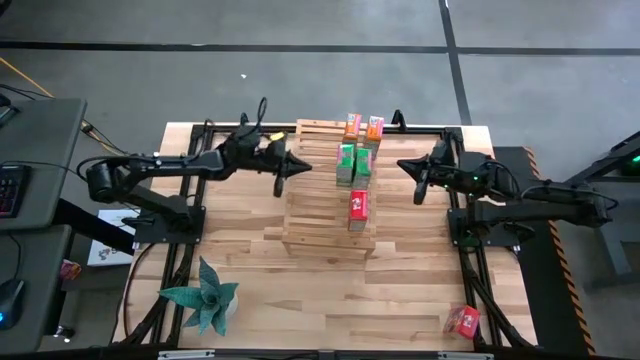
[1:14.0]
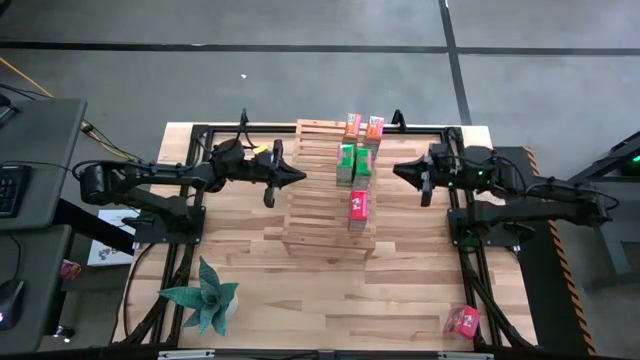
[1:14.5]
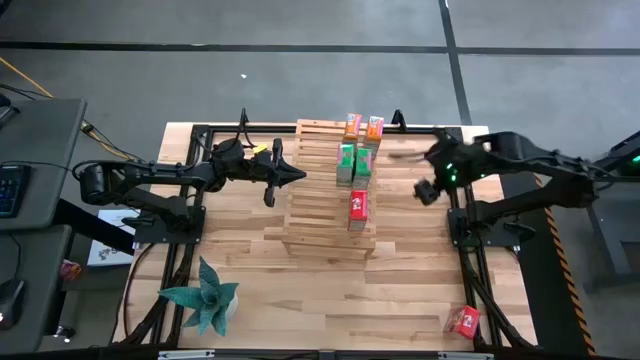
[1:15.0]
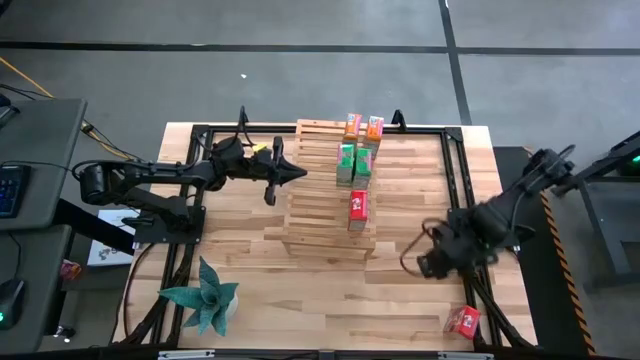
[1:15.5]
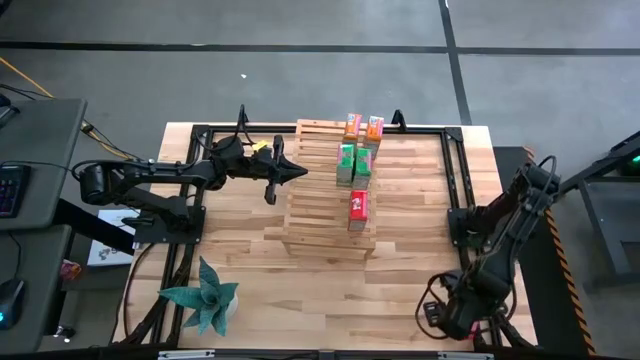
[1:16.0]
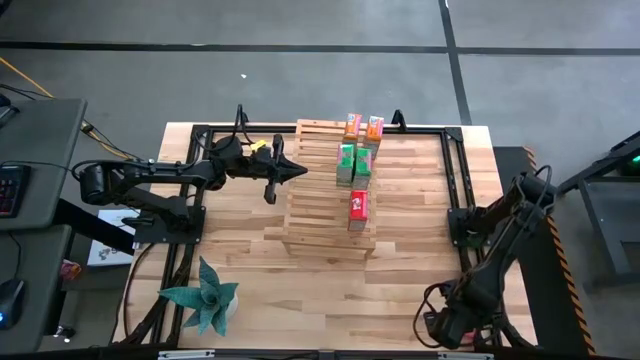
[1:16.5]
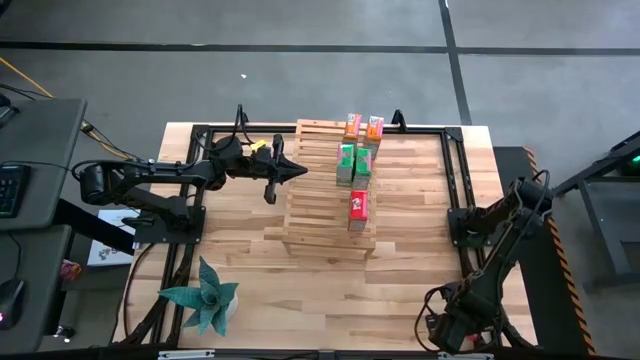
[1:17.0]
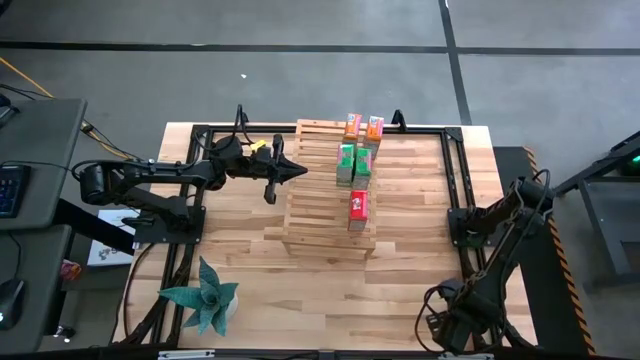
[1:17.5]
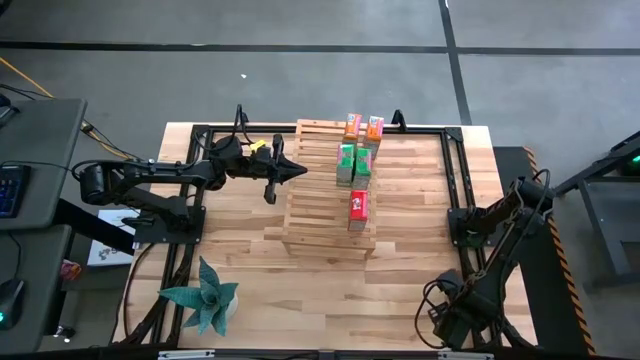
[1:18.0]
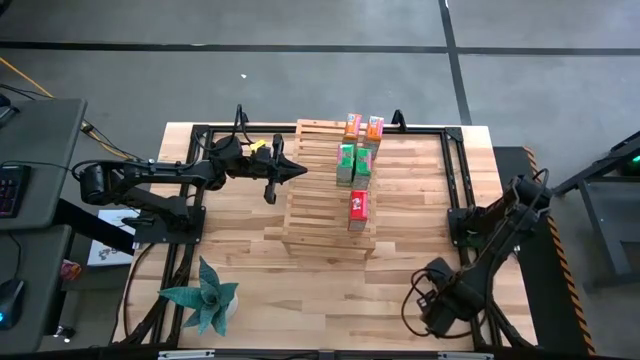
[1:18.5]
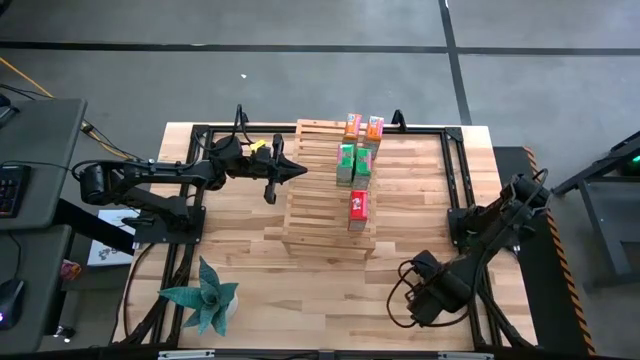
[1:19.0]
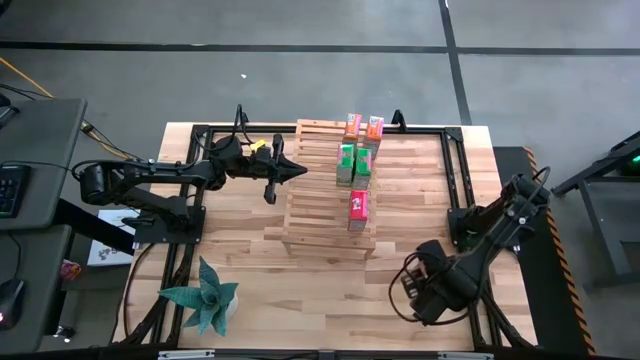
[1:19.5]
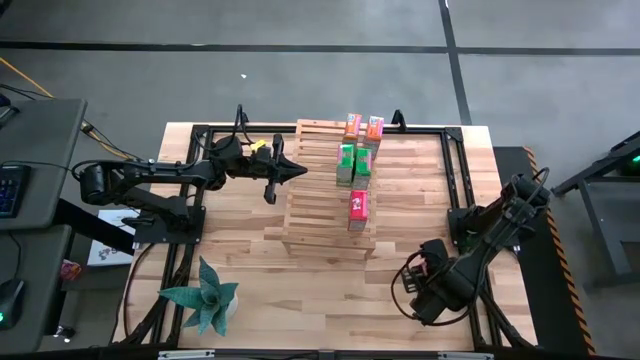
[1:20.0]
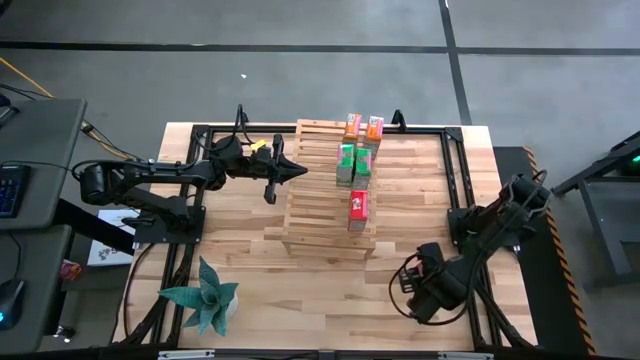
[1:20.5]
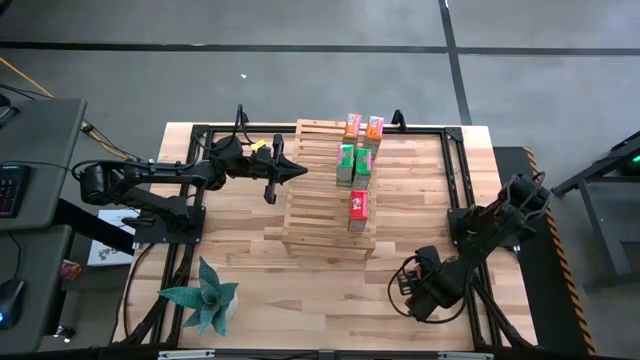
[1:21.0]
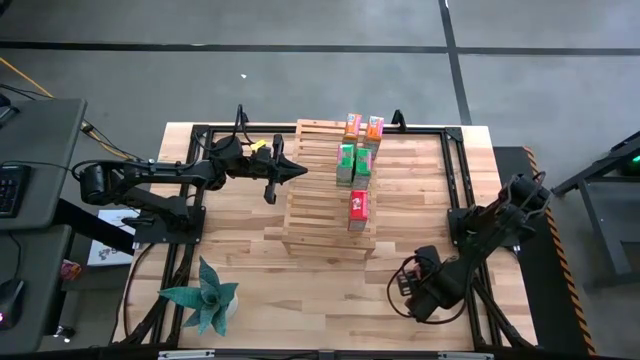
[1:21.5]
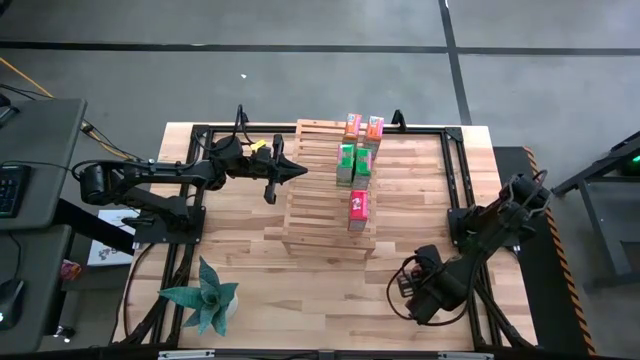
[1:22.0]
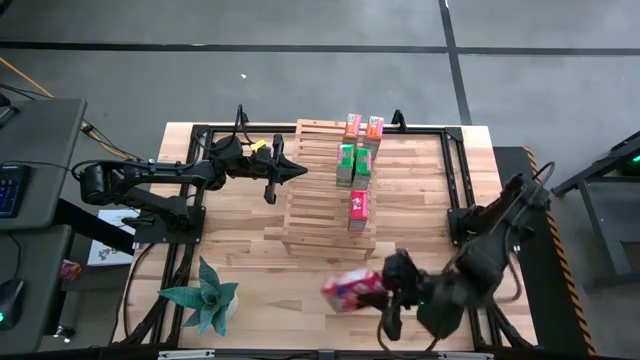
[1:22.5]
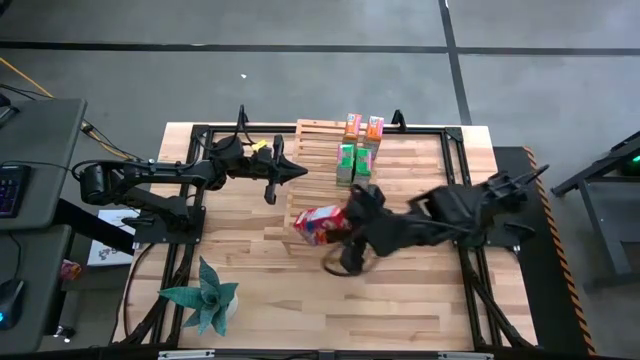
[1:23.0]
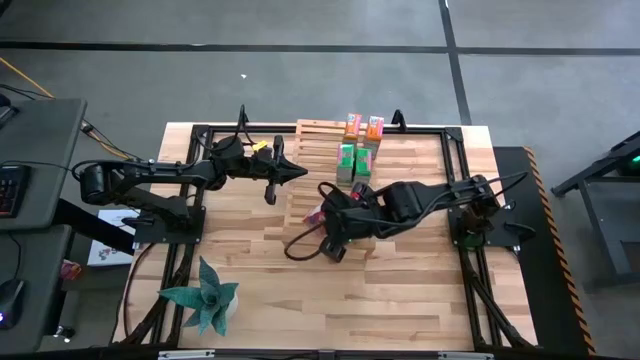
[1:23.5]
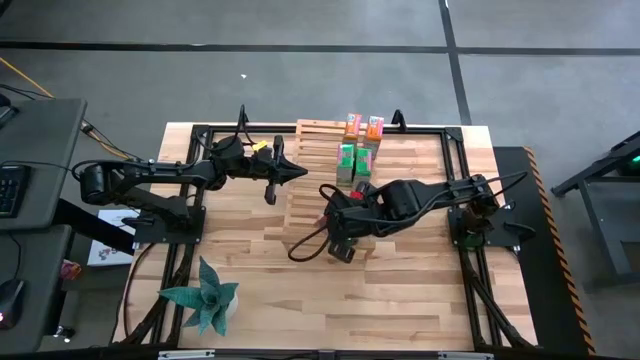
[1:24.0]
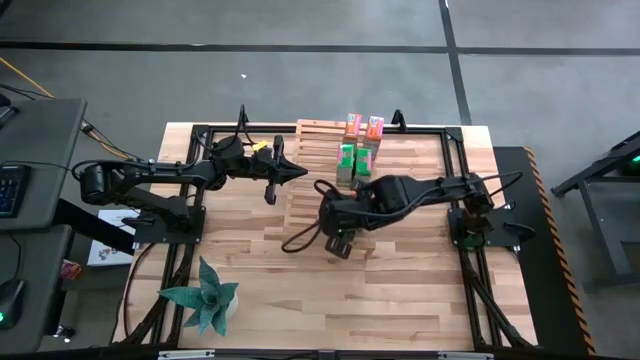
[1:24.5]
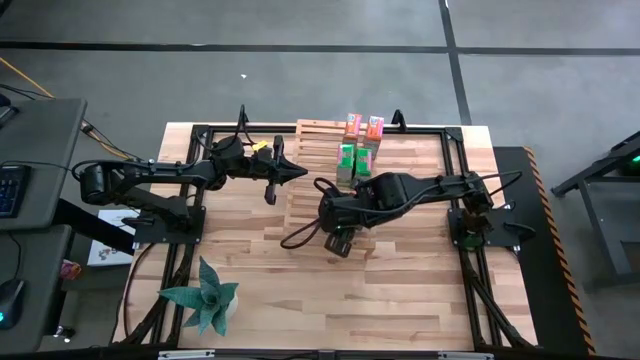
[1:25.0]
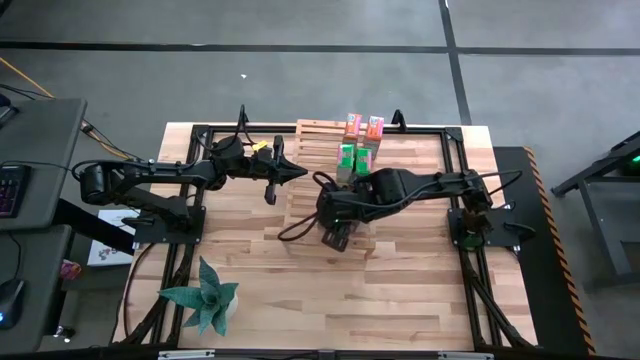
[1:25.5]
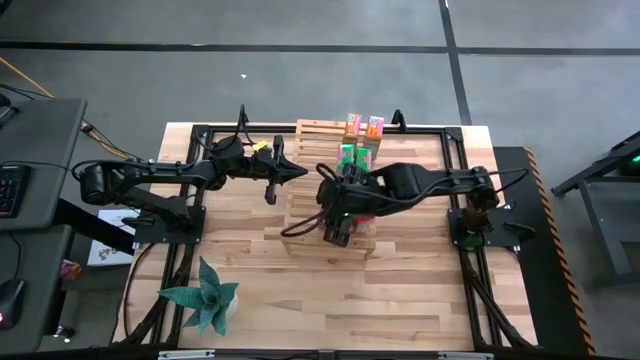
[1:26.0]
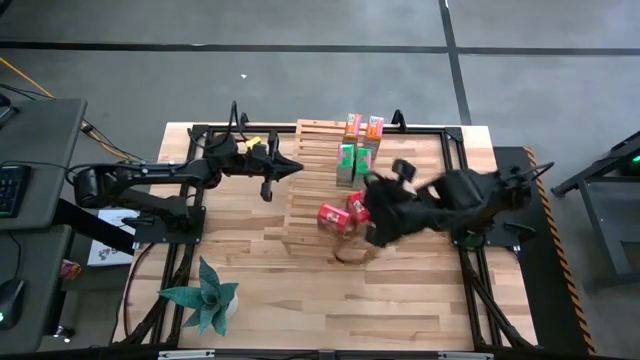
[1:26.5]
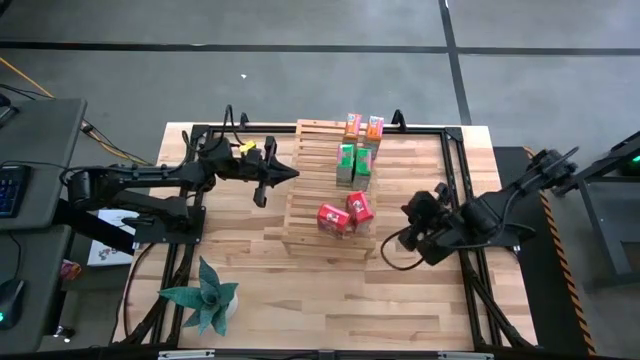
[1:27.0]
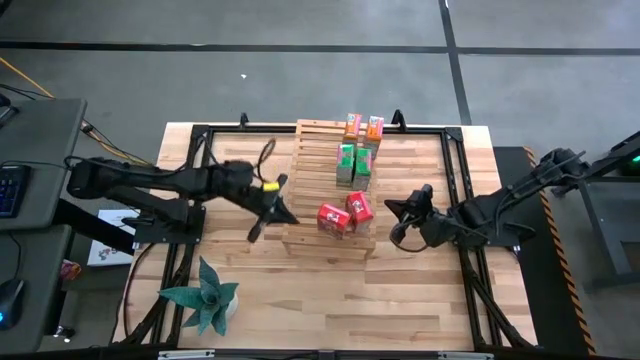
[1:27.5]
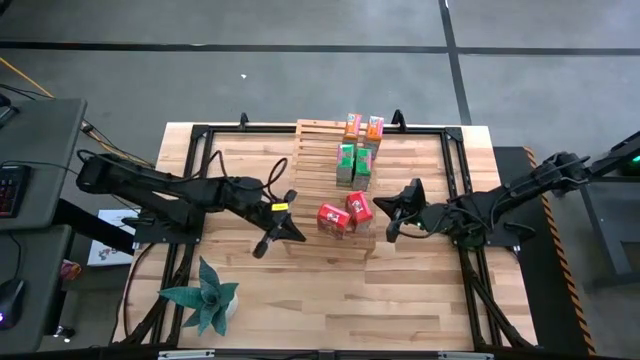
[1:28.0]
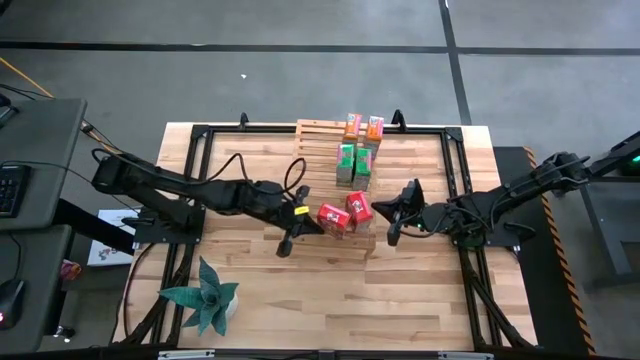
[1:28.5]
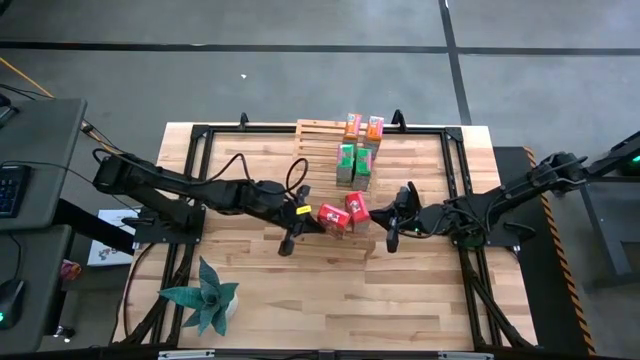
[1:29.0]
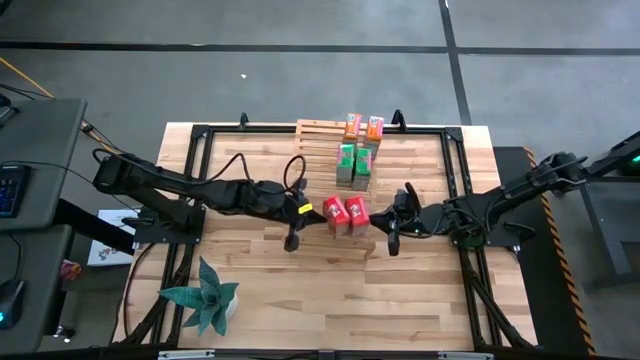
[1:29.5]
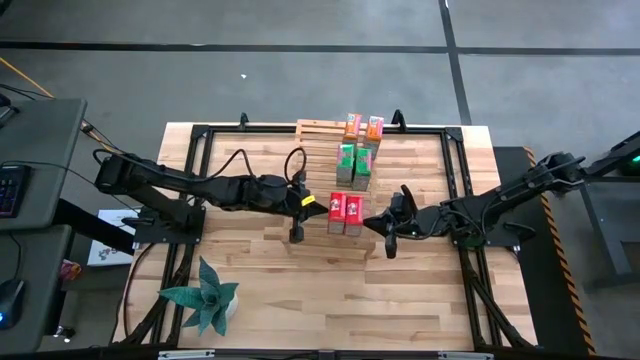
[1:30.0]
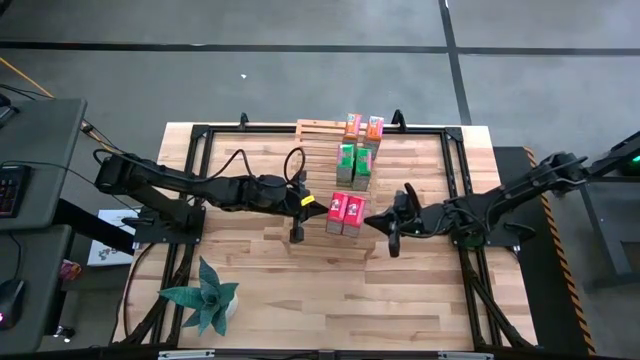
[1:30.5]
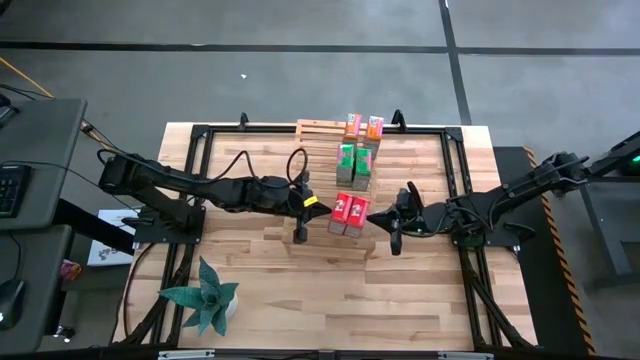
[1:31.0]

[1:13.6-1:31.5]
Task: Stack cereal on shelf
Put the red cereal box on the shelf aligned with the red cereal box

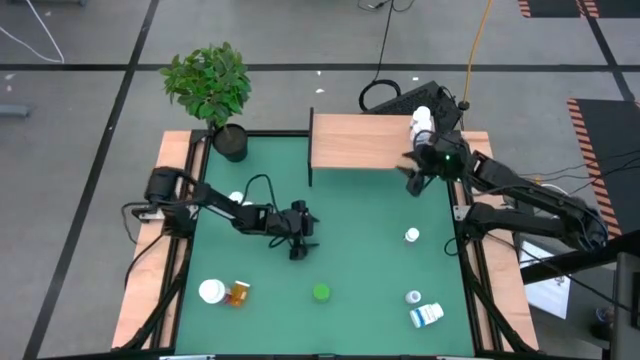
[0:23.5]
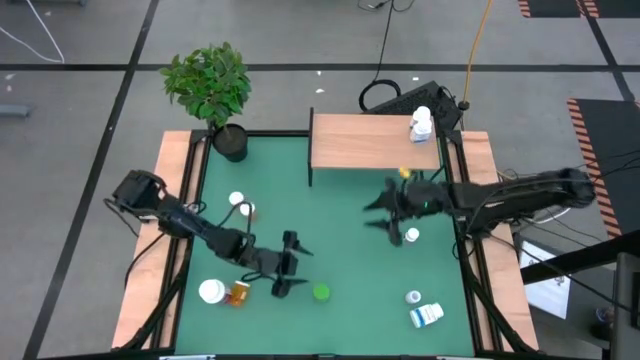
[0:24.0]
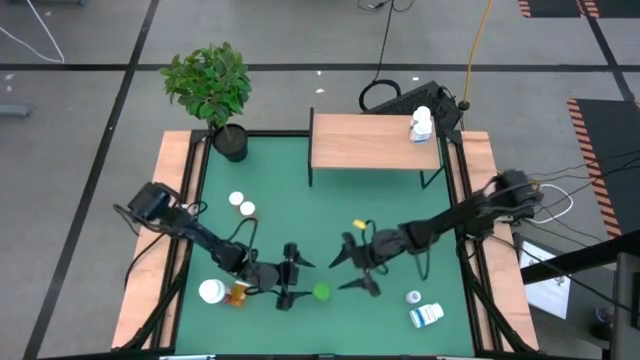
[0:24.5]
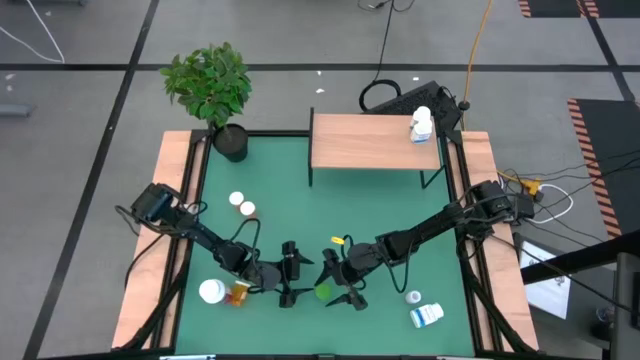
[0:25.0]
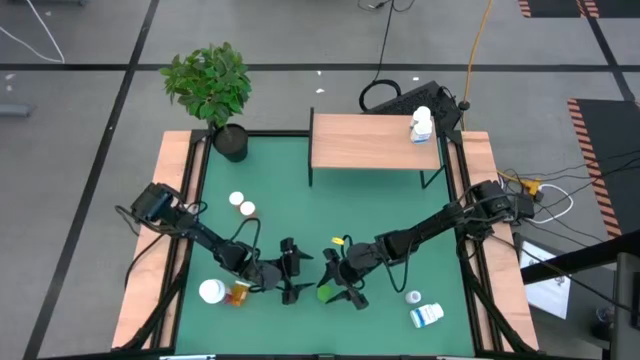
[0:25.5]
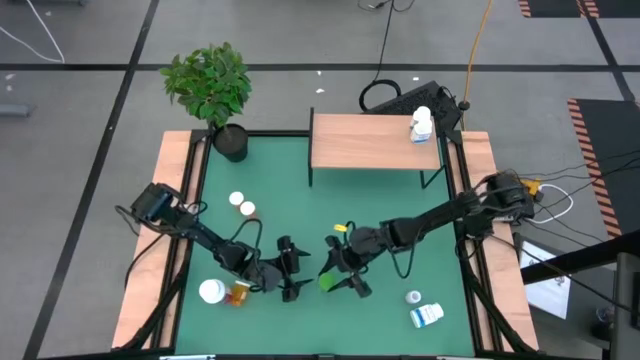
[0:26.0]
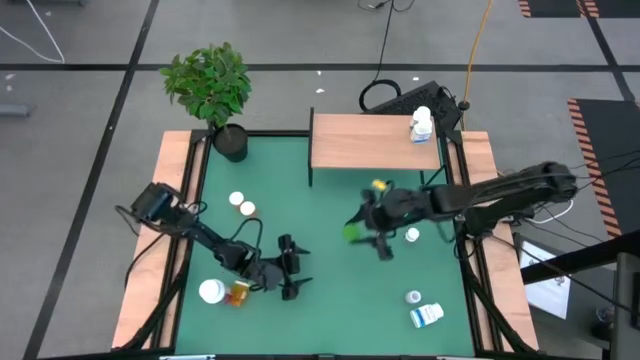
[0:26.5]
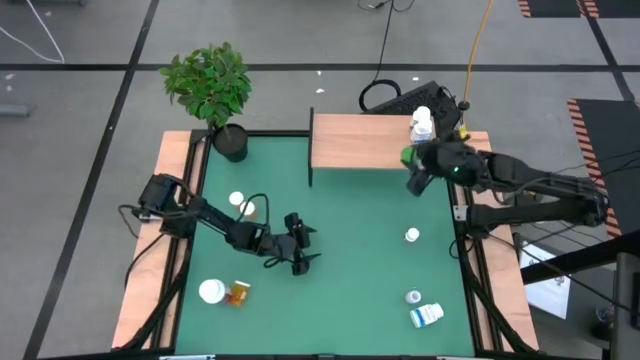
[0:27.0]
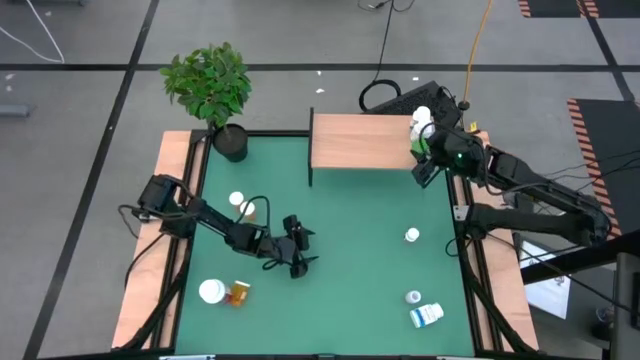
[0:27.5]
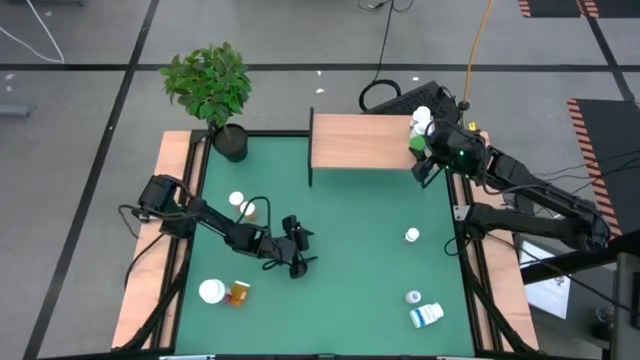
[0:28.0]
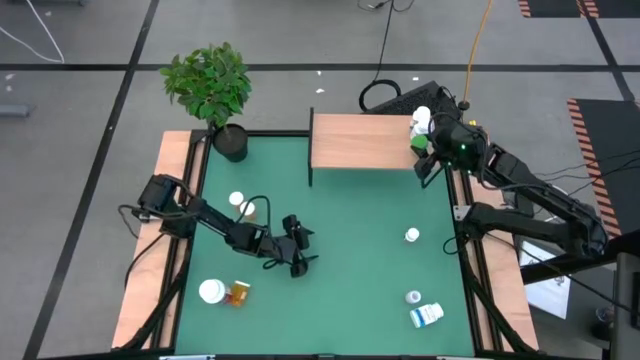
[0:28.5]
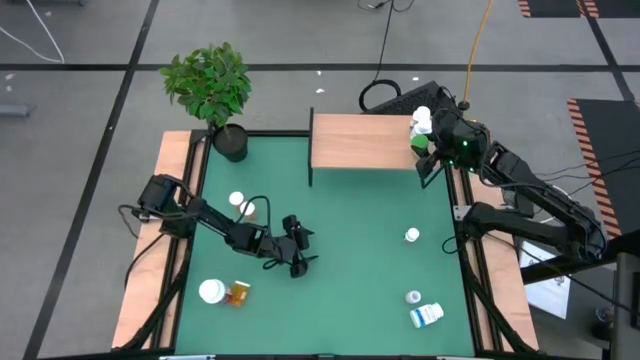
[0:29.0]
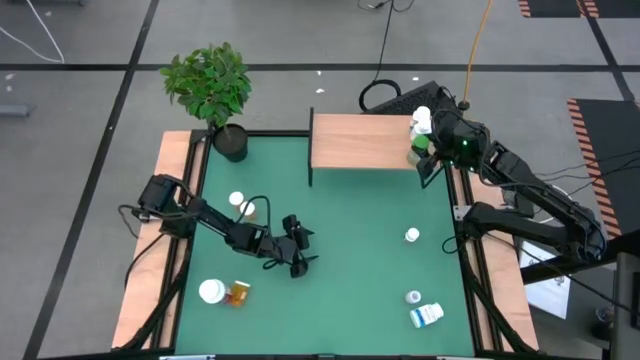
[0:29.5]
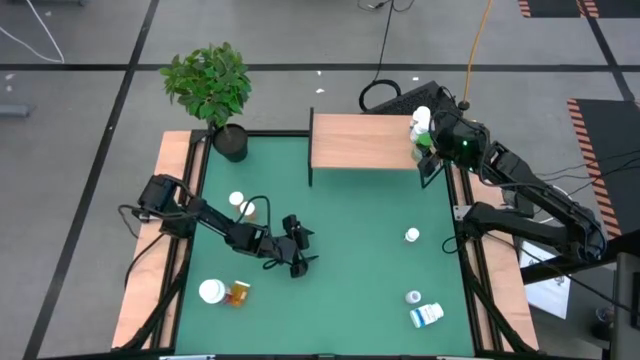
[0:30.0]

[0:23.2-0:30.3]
Task: Pick and place medicine bottles onto shelf by color
Put the green pill bottle on the shelf
